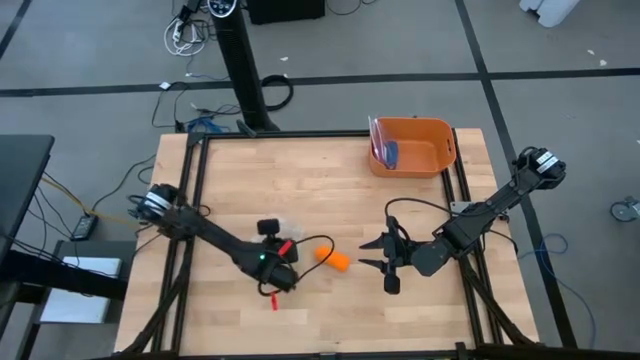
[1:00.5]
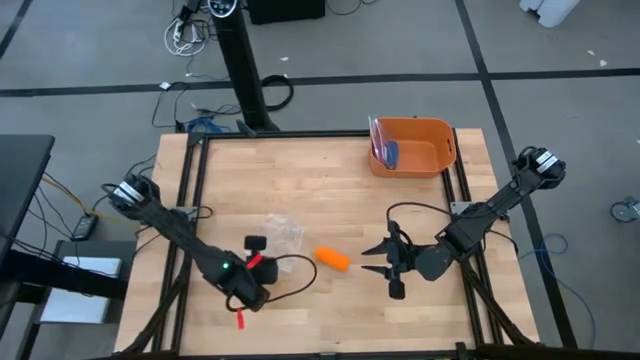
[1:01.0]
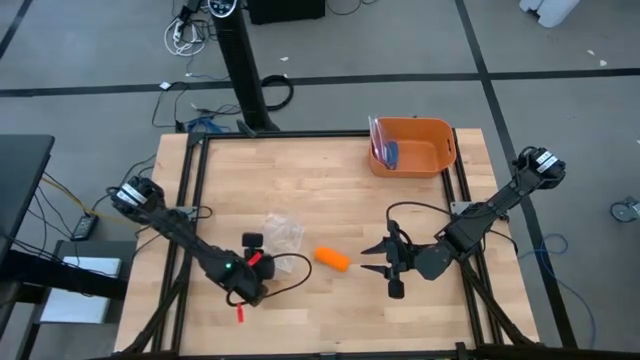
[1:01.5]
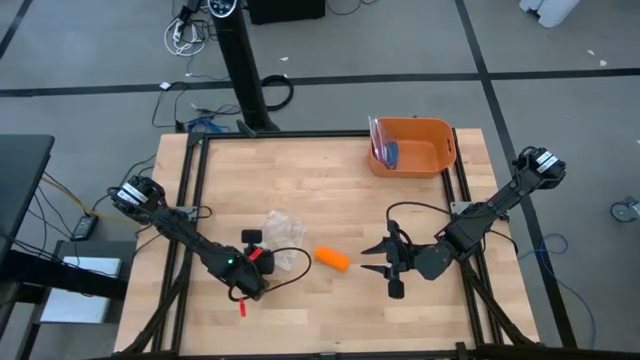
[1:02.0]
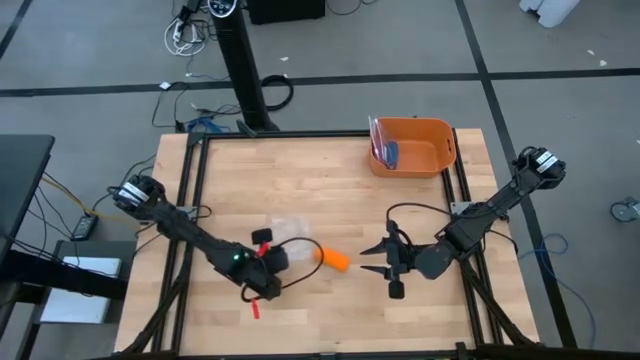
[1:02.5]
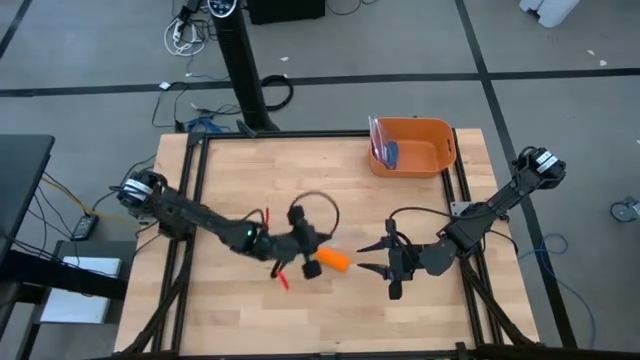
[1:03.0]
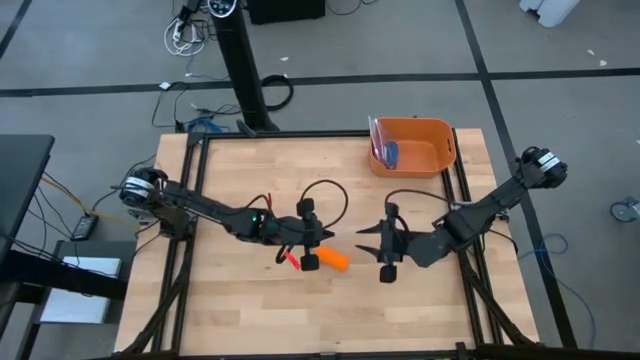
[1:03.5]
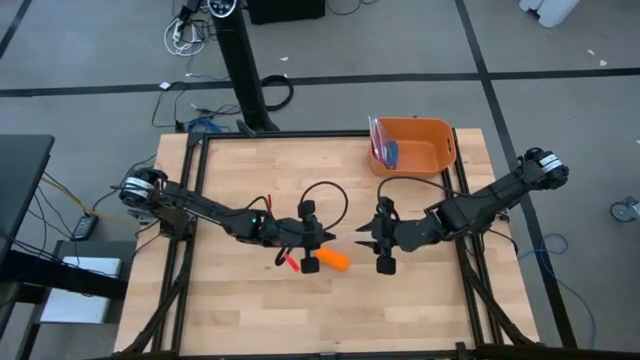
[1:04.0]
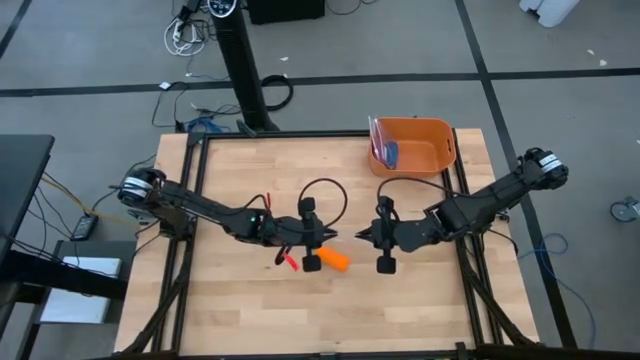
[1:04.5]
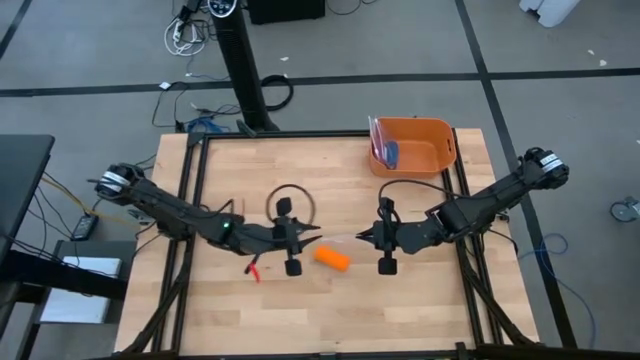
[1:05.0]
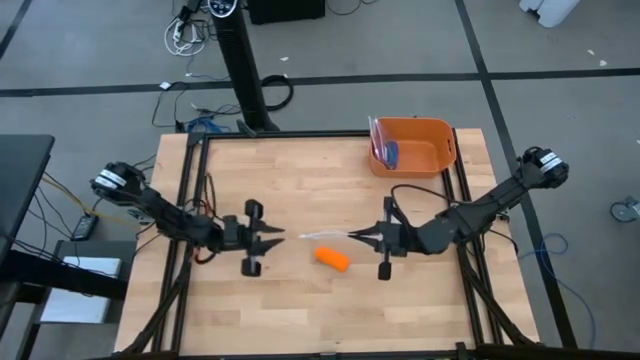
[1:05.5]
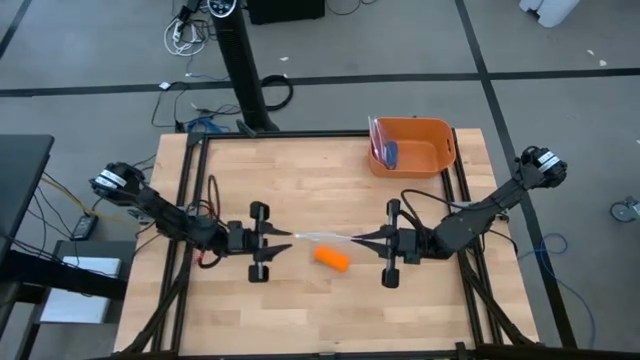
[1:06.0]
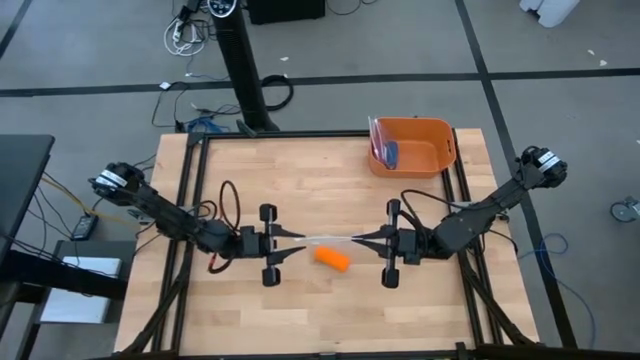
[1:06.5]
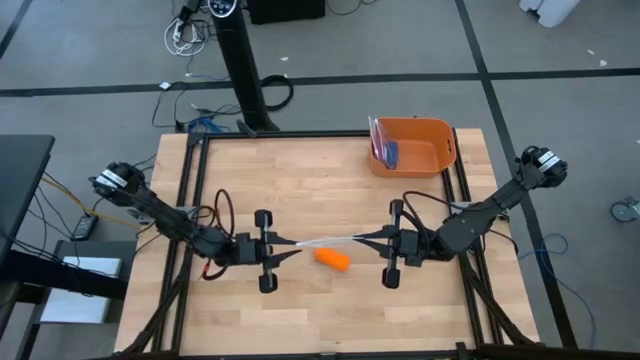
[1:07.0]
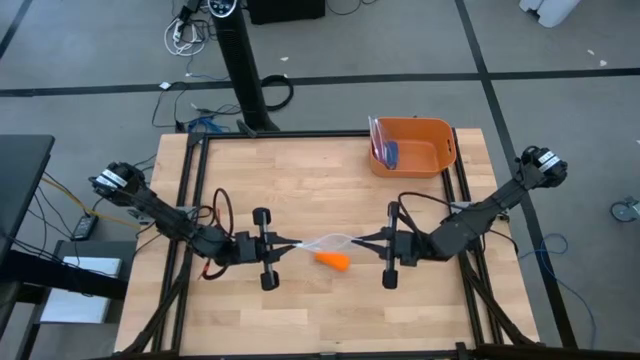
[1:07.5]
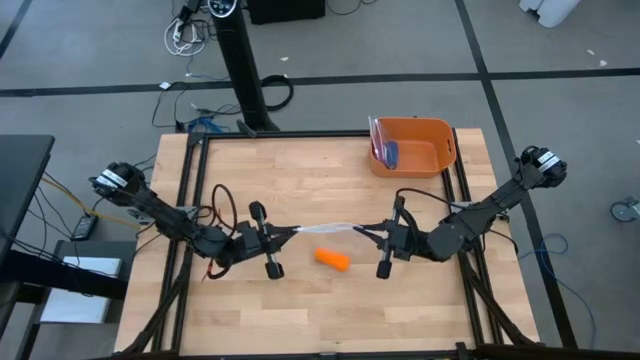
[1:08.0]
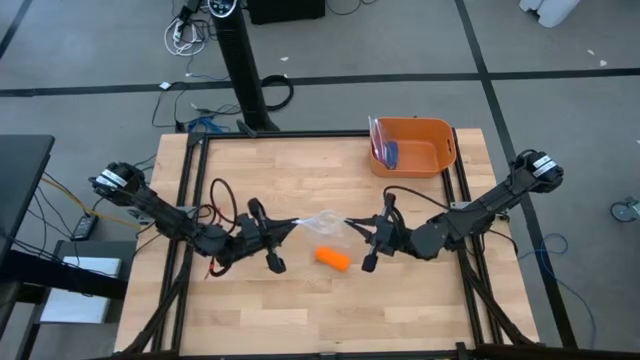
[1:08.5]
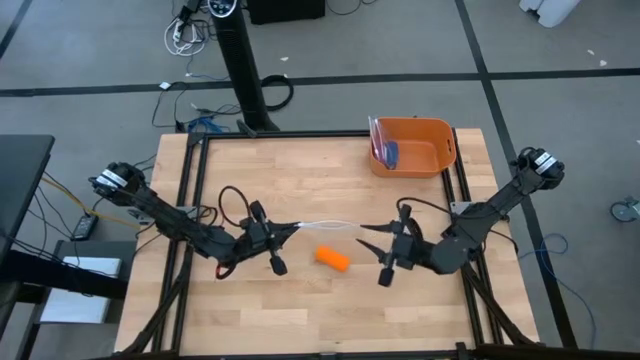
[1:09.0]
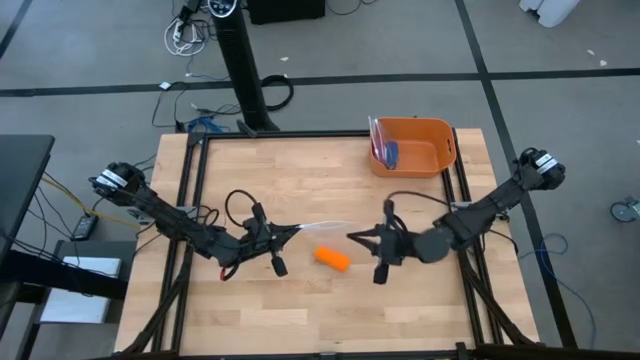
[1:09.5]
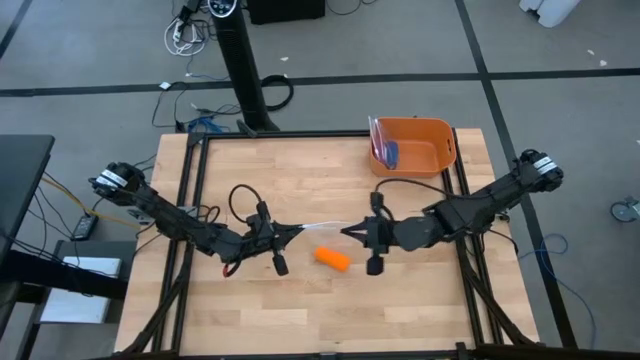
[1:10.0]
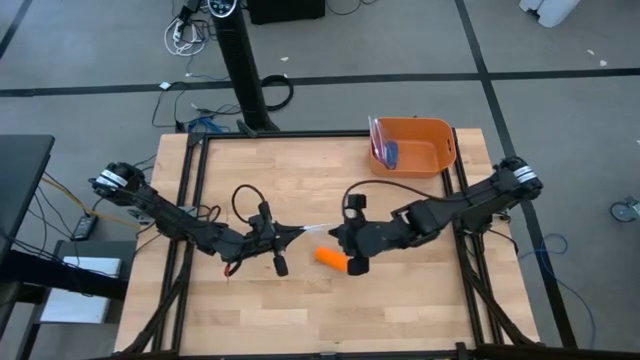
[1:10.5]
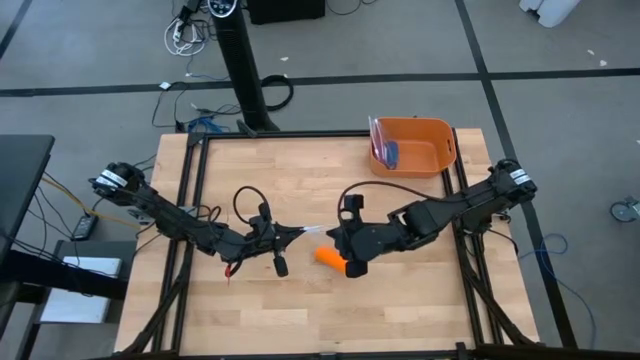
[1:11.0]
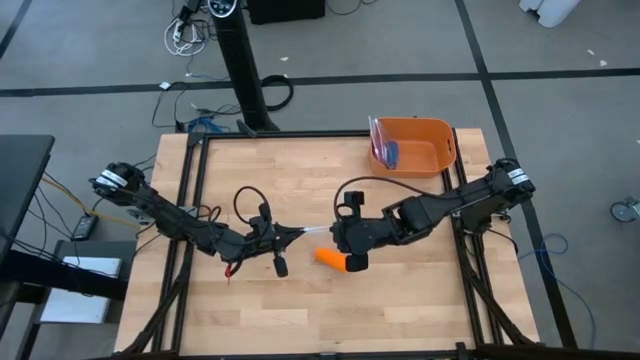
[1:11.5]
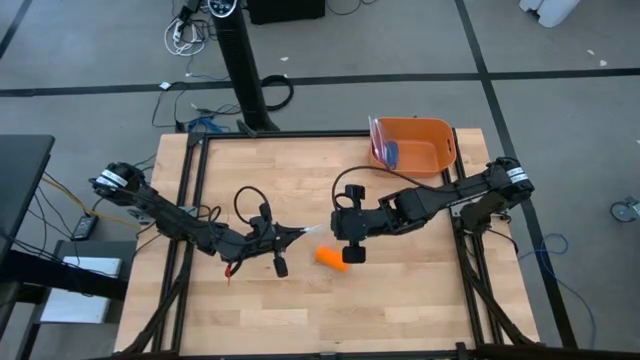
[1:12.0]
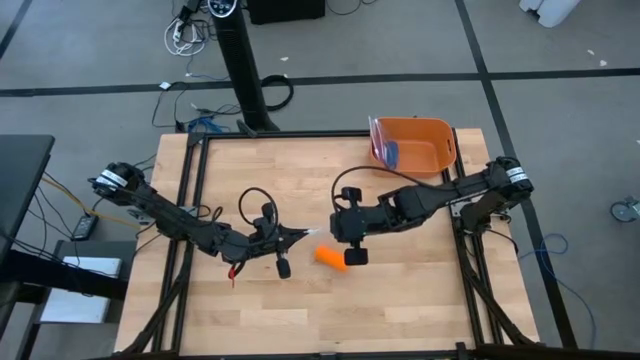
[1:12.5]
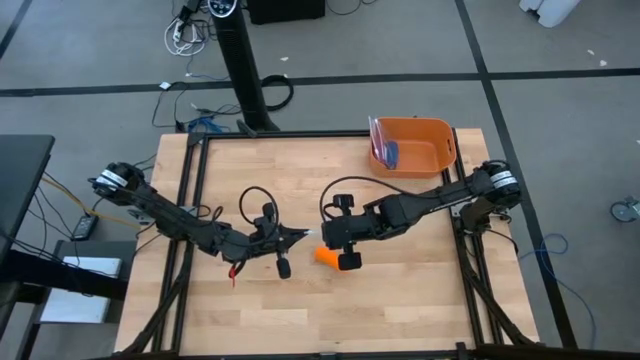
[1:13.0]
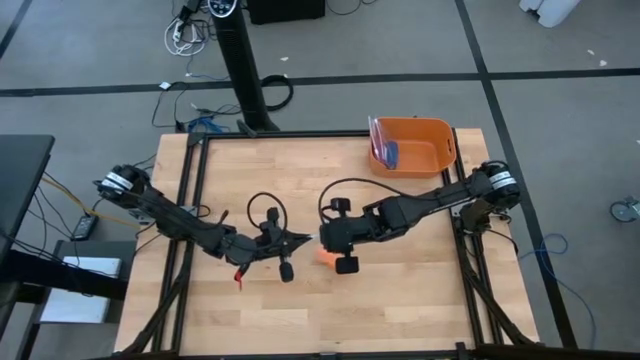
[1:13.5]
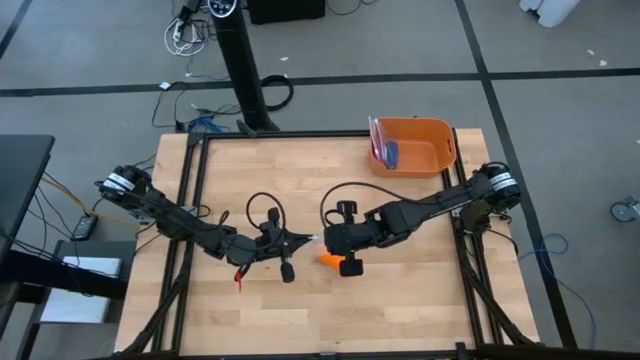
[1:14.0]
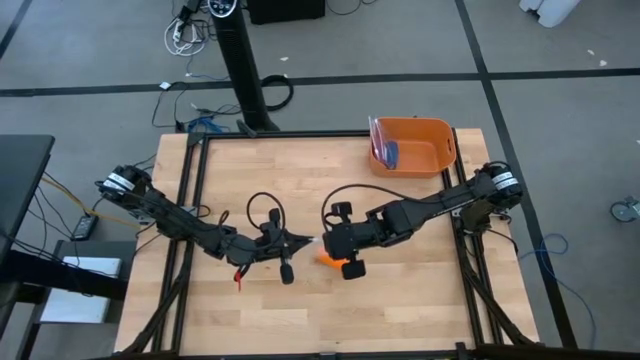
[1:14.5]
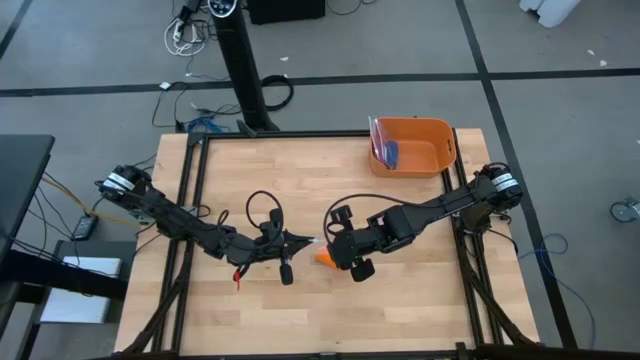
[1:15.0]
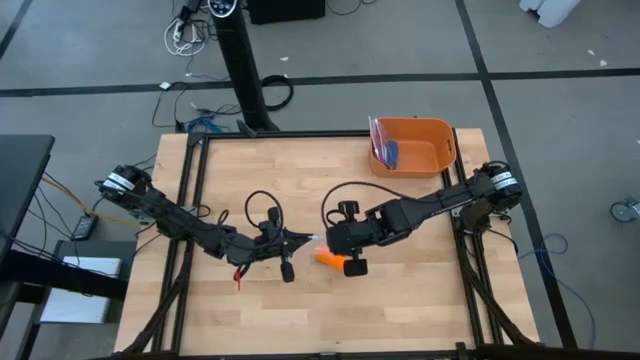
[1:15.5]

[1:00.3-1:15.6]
Task: Roll bandage
Prepare the transparent zip bag

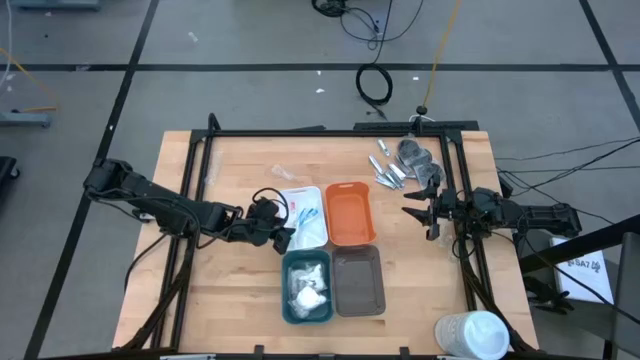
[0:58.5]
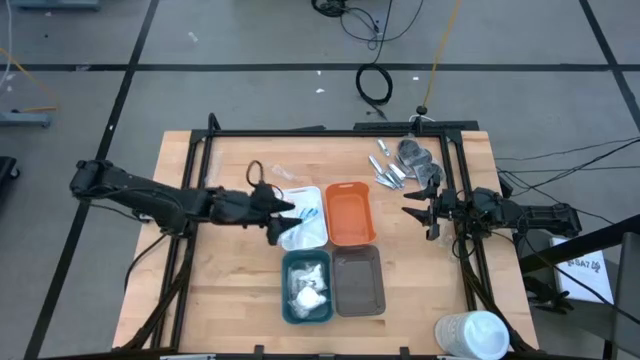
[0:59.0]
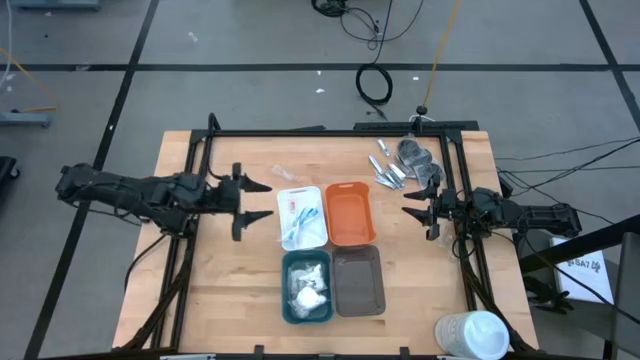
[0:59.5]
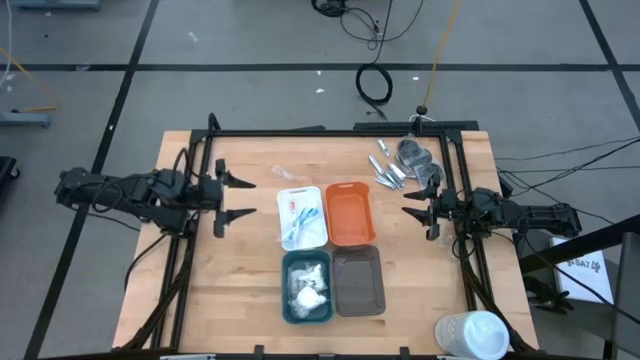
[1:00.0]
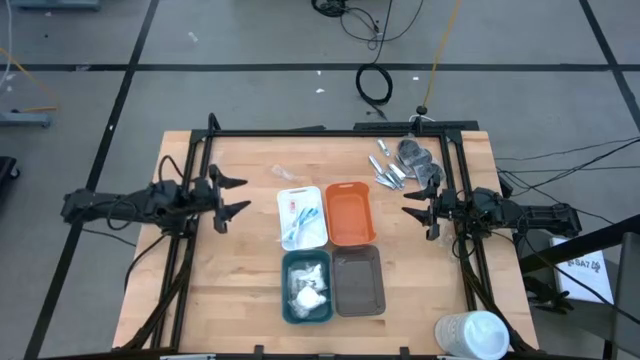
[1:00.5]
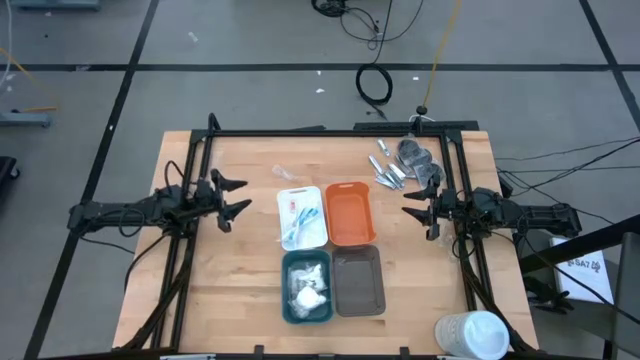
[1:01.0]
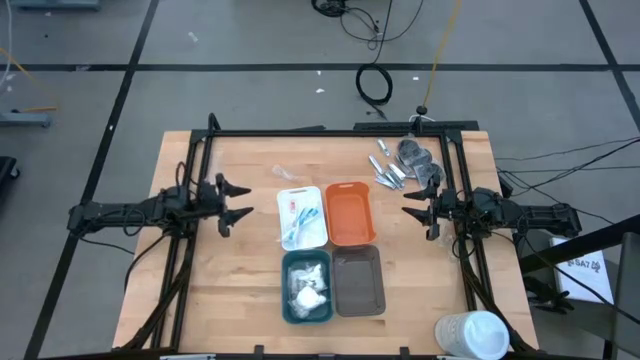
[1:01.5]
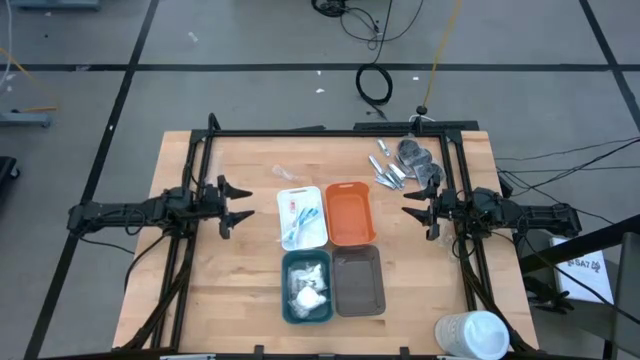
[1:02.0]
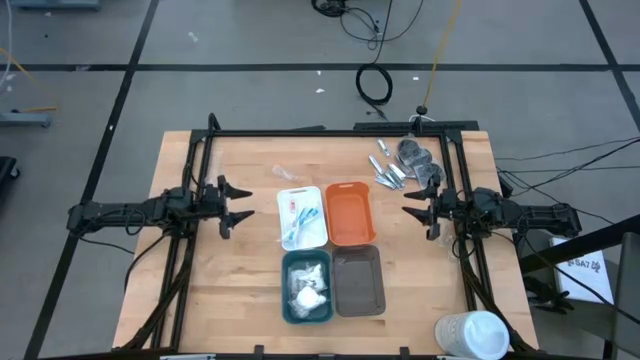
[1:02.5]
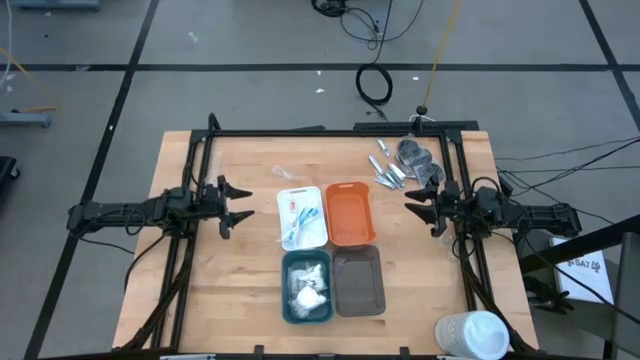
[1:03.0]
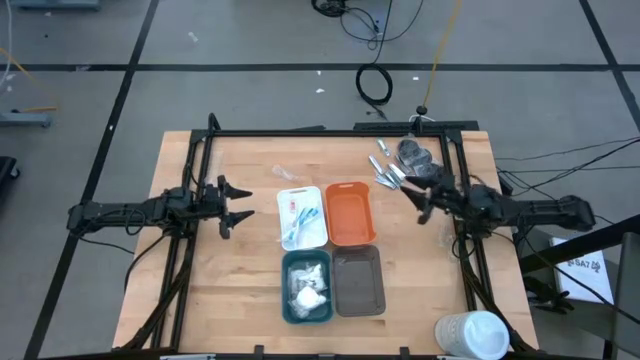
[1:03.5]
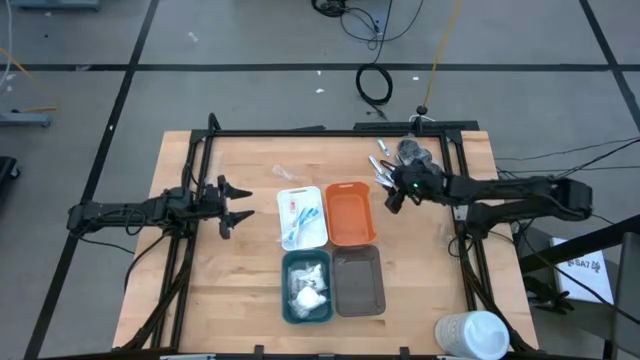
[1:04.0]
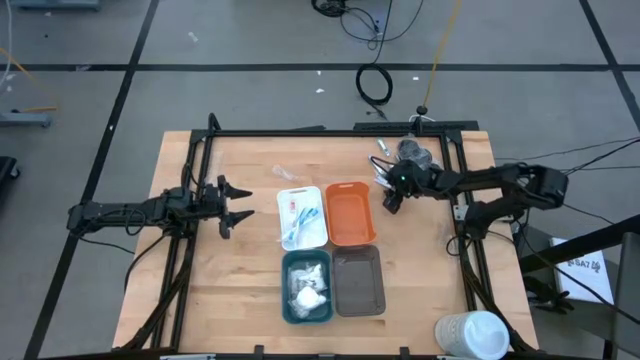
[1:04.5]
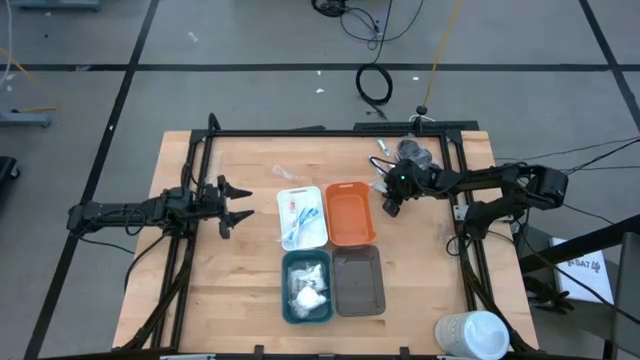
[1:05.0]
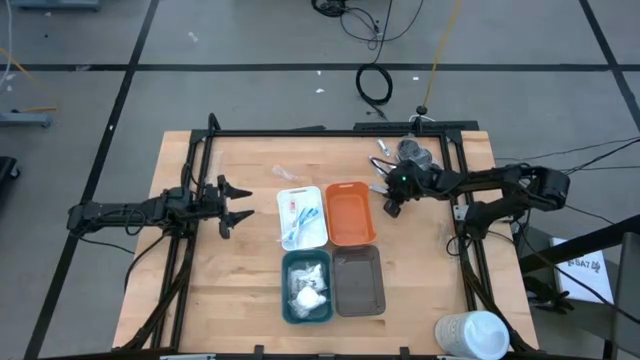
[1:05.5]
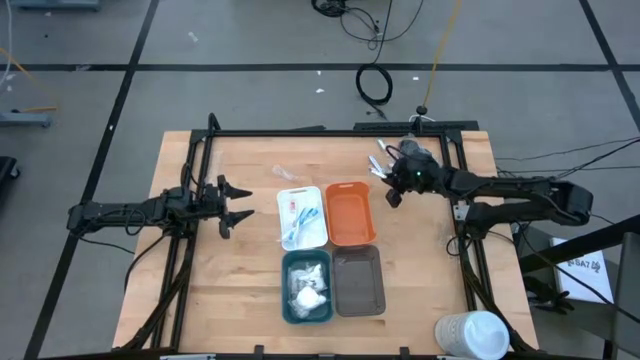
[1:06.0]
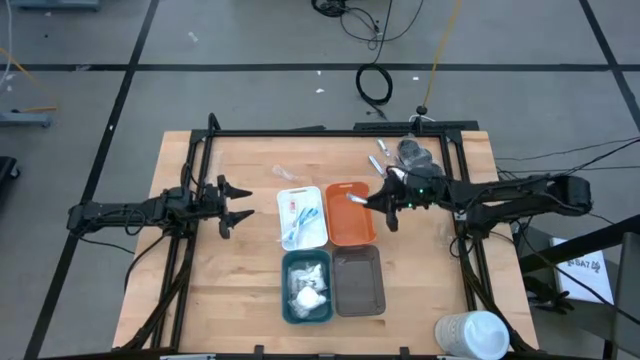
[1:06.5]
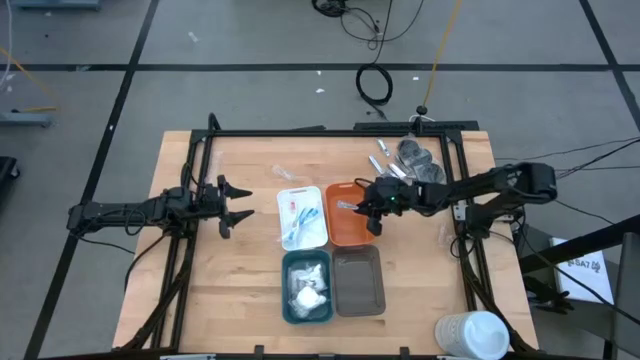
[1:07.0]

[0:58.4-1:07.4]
Task: Pick & Place Travel size toiletries
Put the nail cutter into the orange bin
